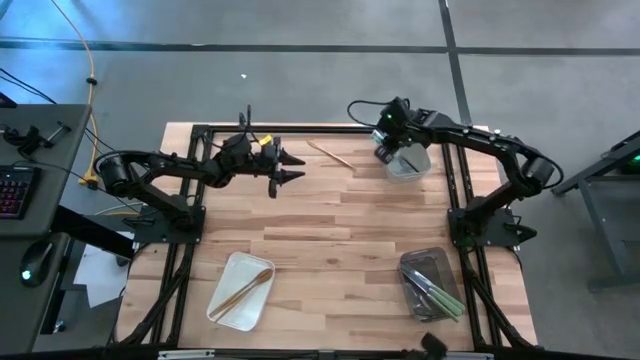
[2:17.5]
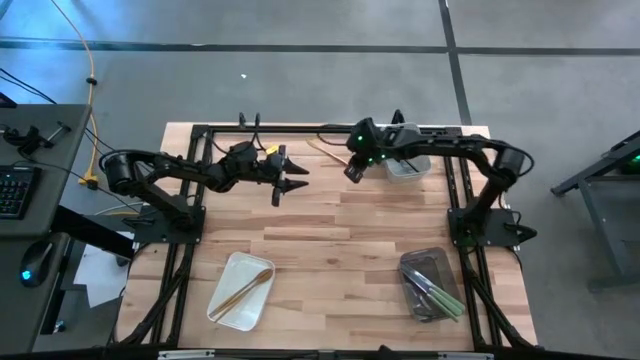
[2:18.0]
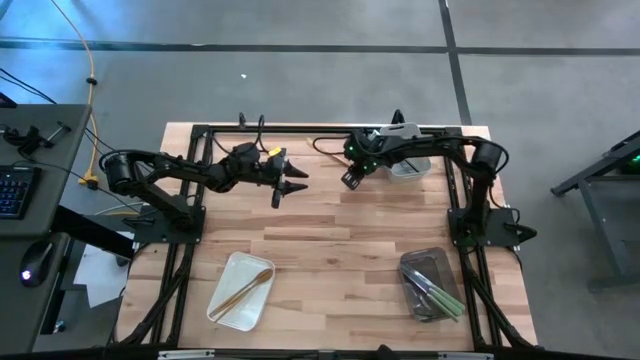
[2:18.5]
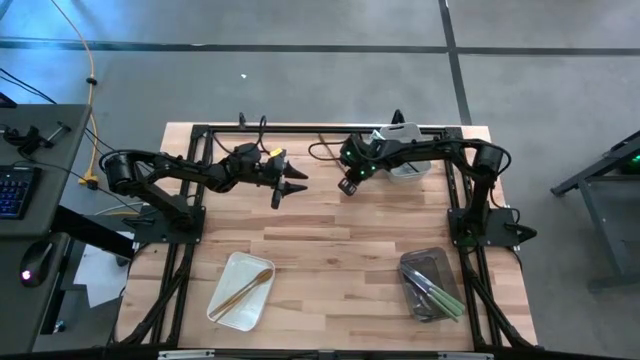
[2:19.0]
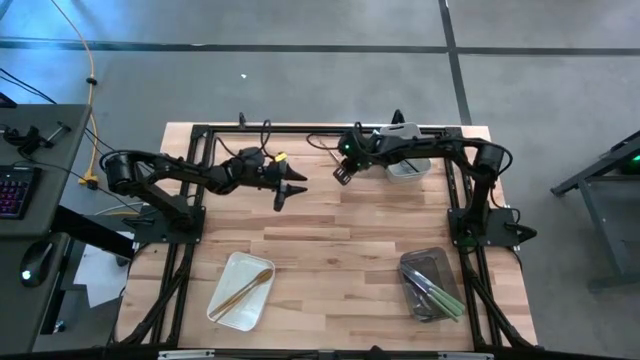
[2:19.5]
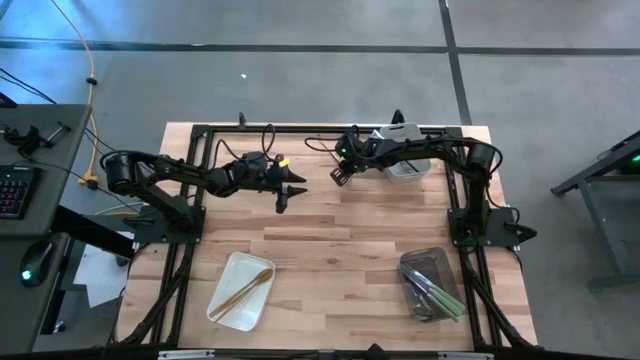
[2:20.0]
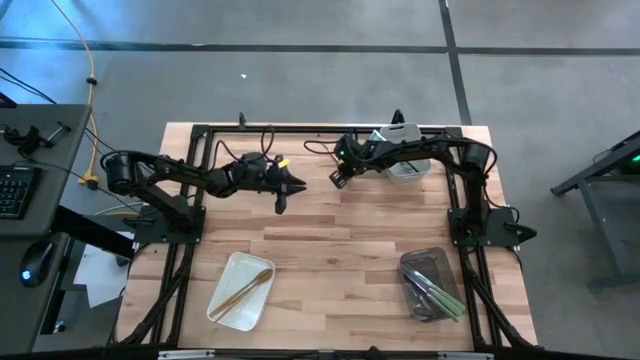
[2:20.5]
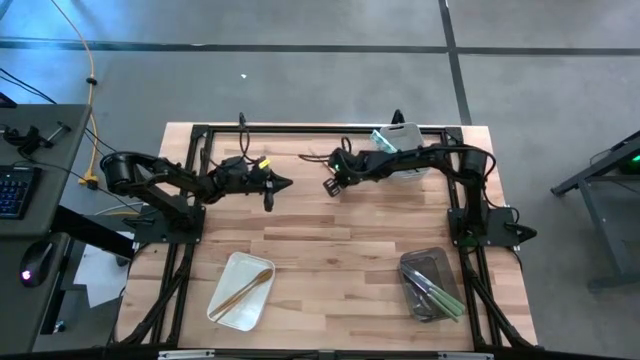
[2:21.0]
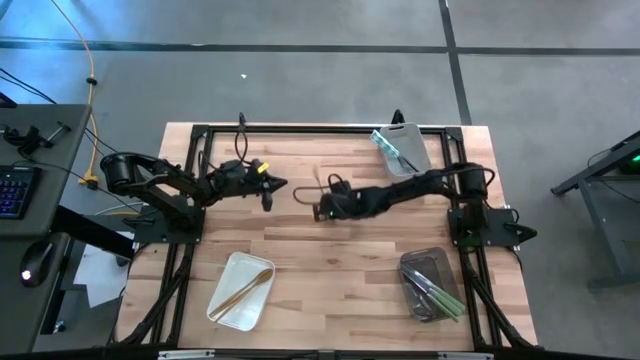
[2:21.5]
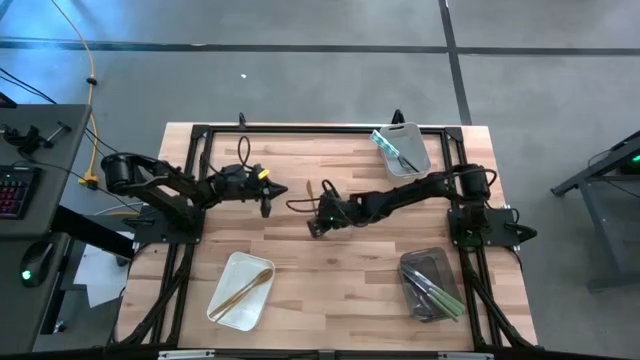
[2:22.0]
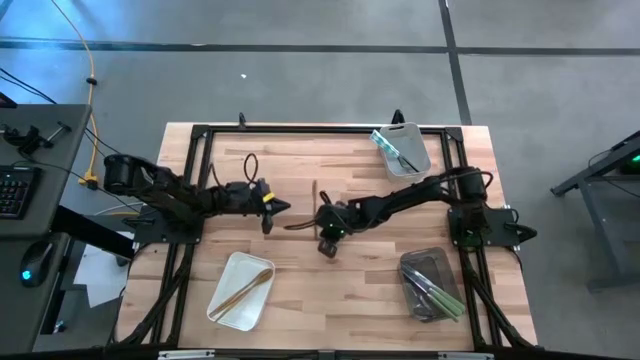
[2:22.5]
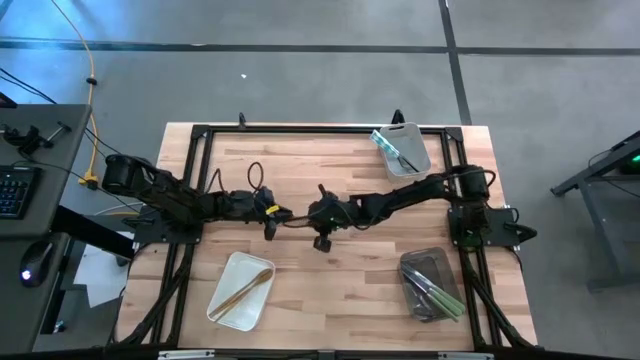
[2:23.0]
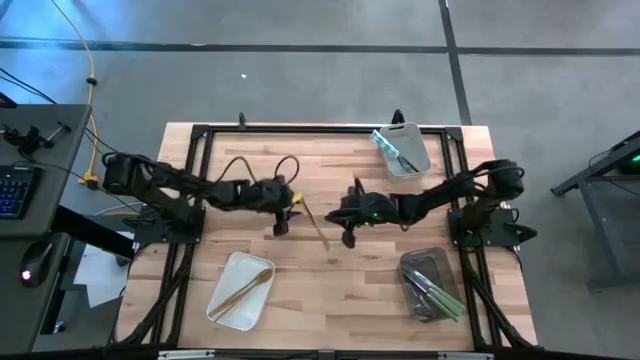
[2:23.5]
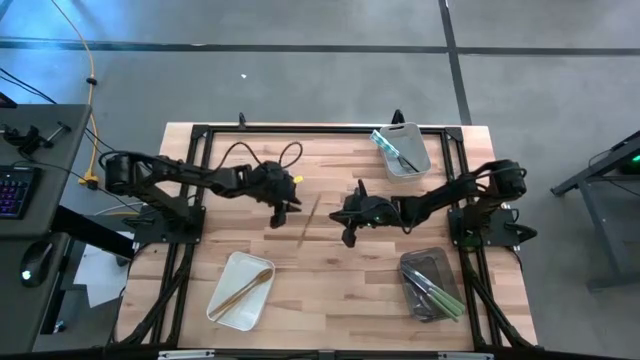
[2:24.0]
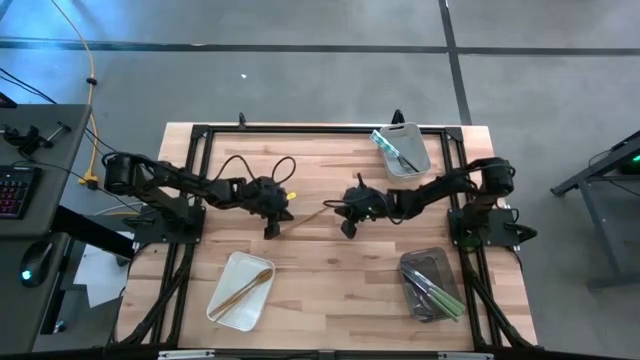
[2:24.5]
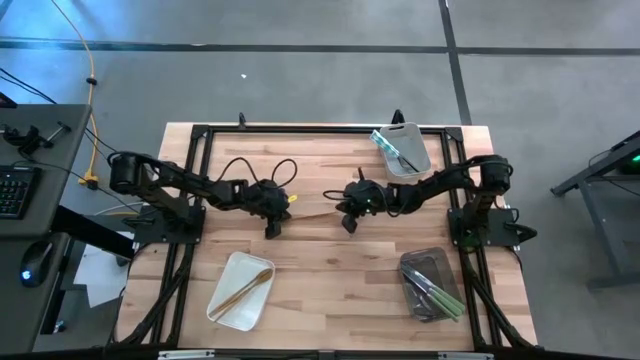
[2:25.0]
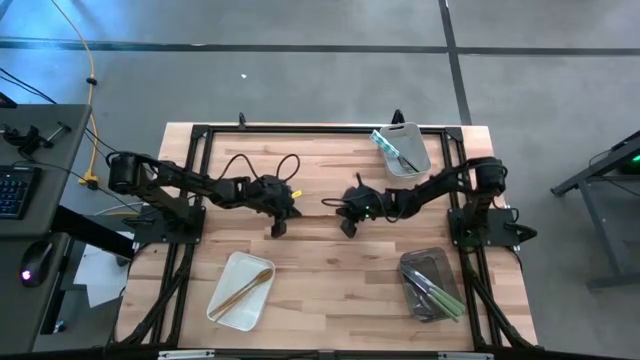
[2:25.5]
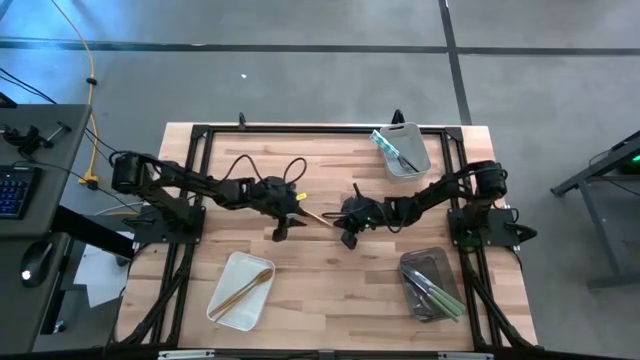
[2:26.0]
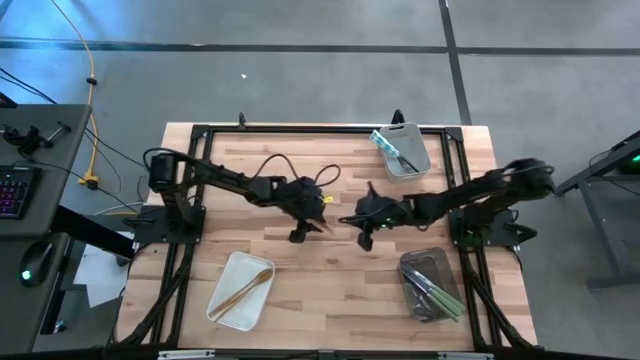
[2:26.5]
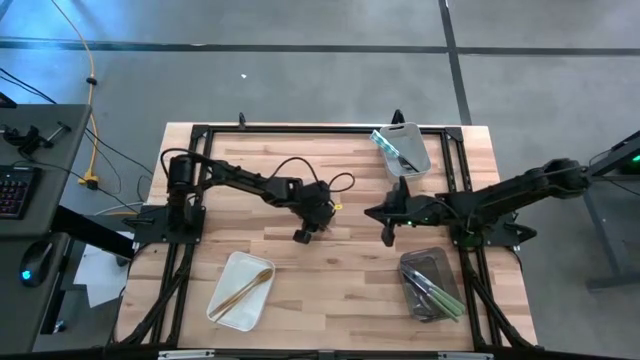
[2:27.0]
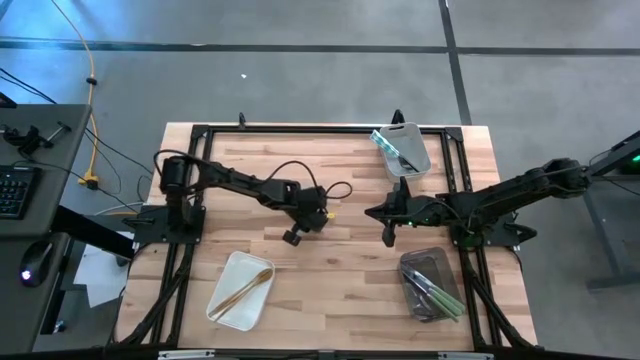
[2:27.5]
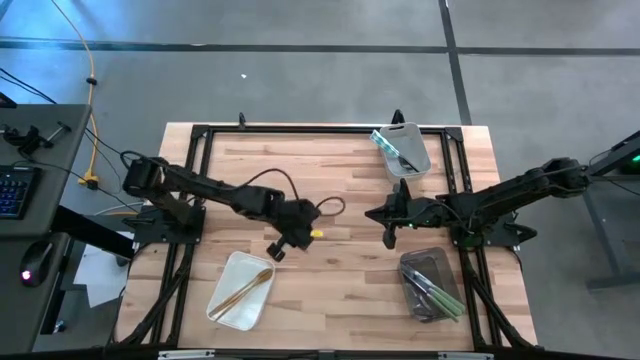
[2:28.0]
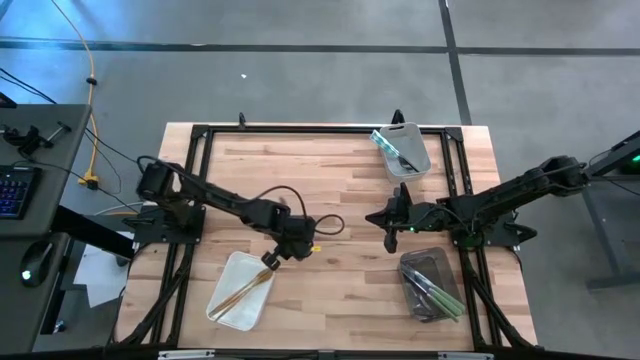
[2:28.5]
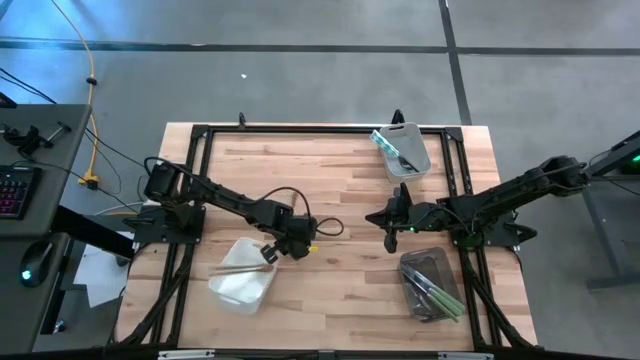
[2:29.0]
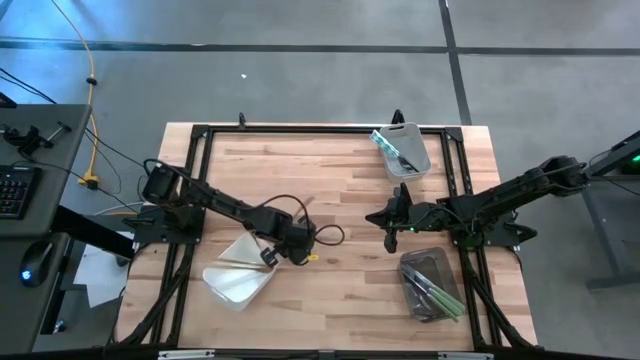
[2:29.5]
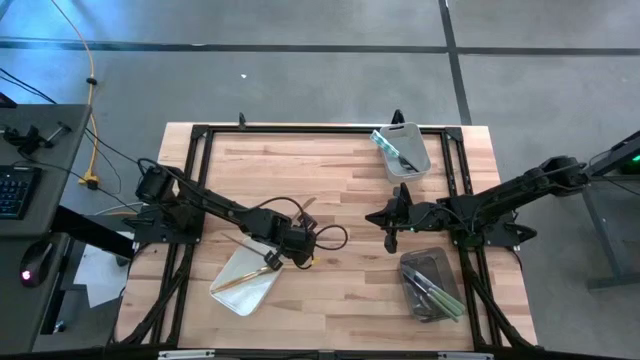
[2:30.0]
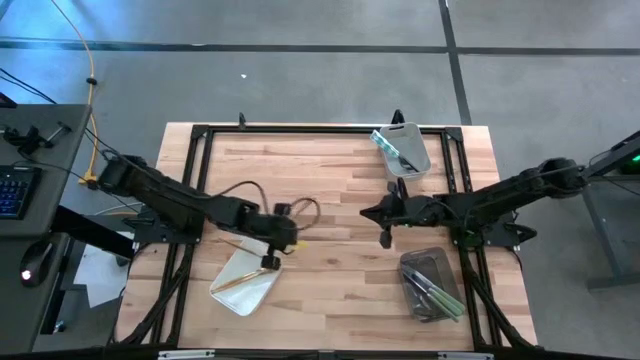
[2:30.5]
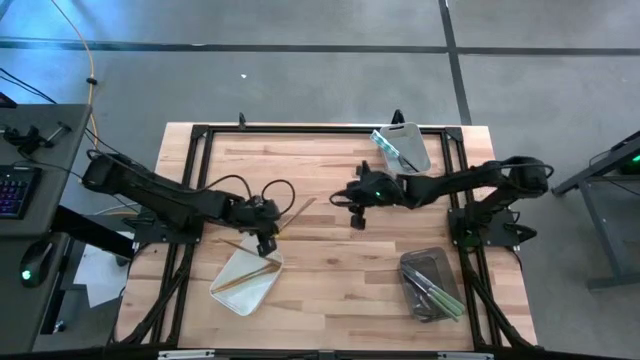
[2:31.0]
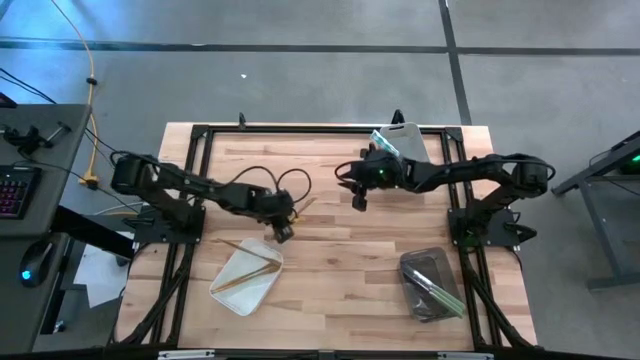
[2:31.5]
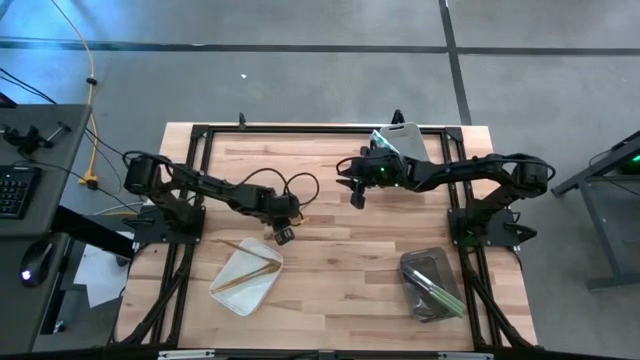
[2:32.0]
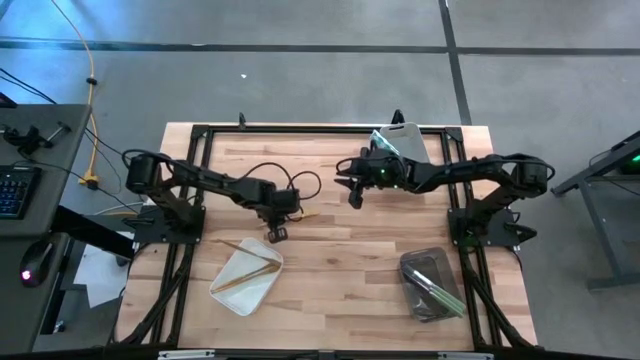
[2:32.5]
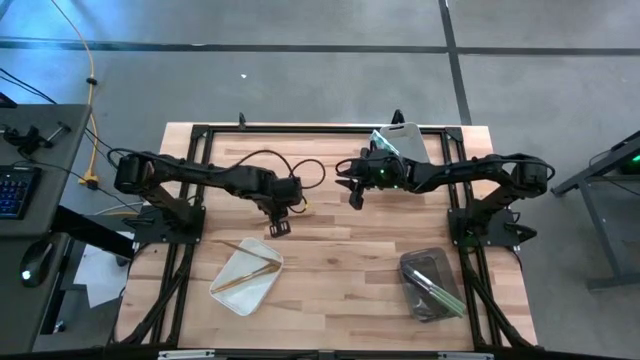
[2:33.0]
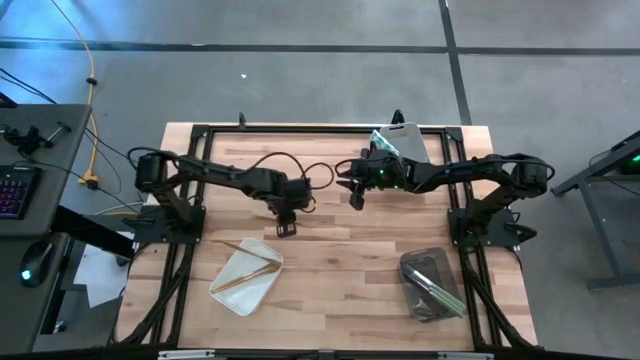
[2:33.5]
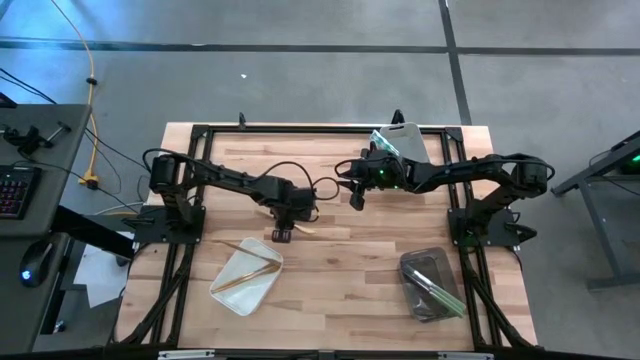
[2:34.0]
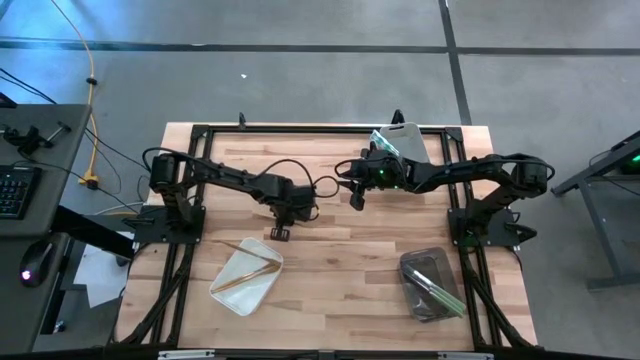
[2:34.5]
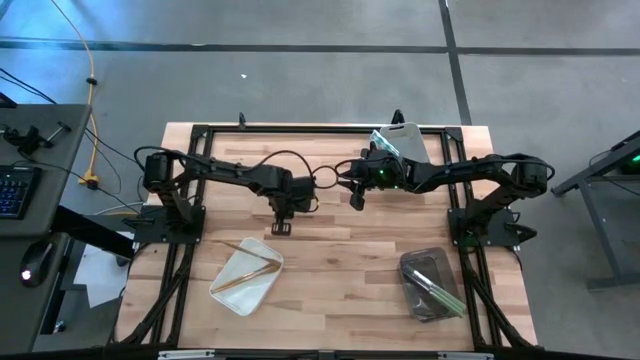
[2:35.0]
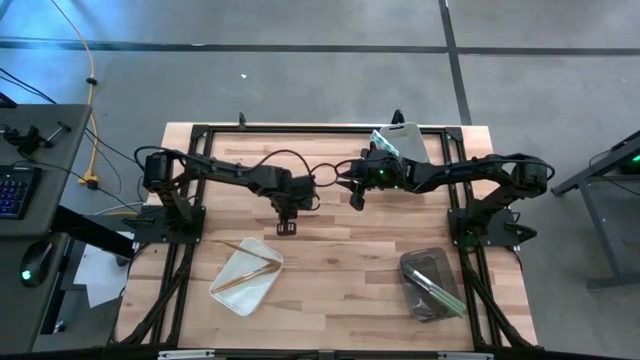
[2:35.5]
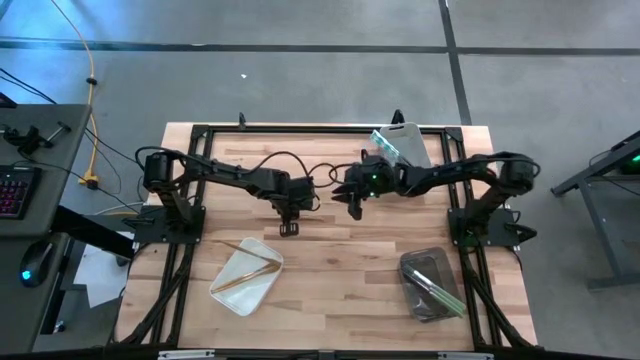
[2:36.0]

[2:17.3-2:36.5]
Task: Sort silverware by color (type)
Put the gold table knife into the white bin

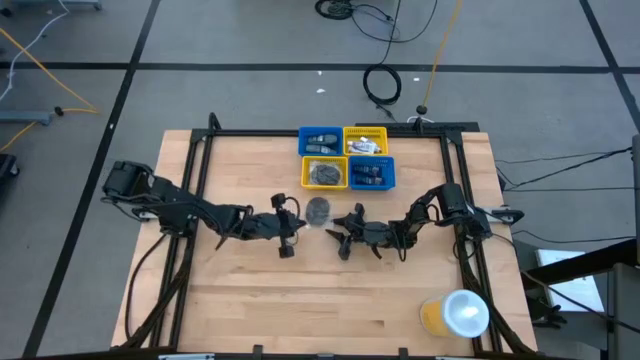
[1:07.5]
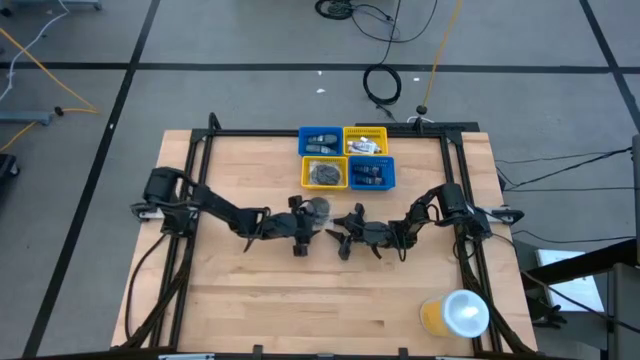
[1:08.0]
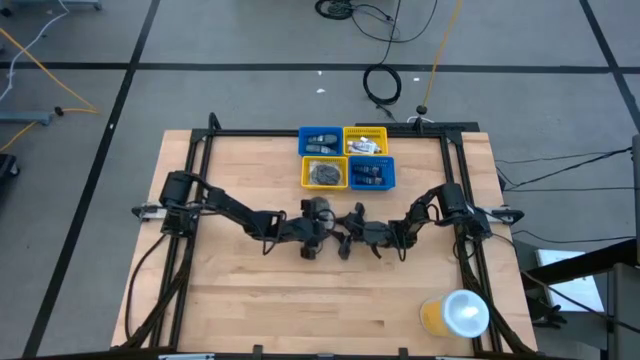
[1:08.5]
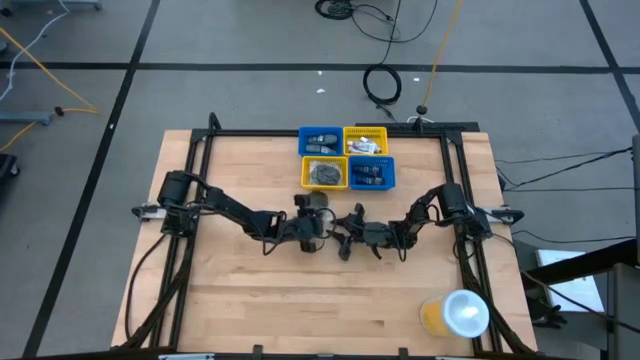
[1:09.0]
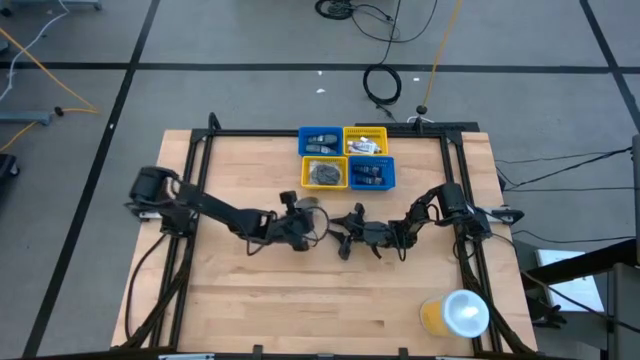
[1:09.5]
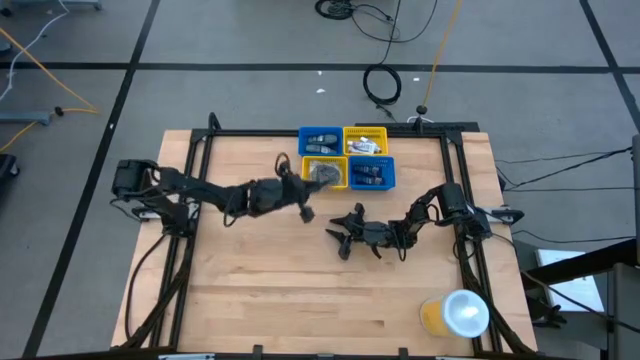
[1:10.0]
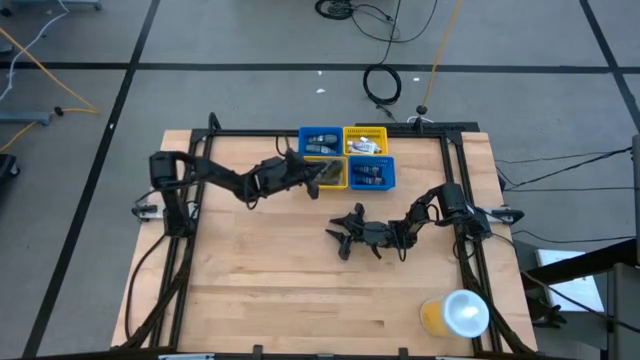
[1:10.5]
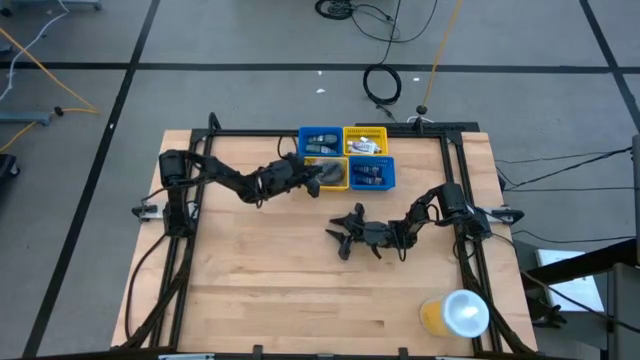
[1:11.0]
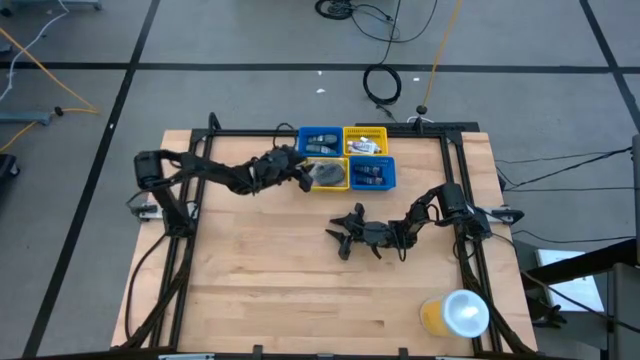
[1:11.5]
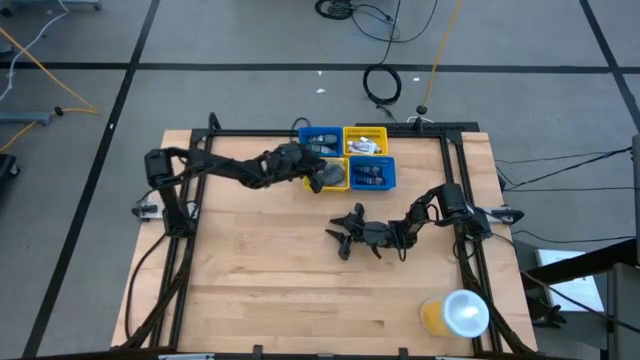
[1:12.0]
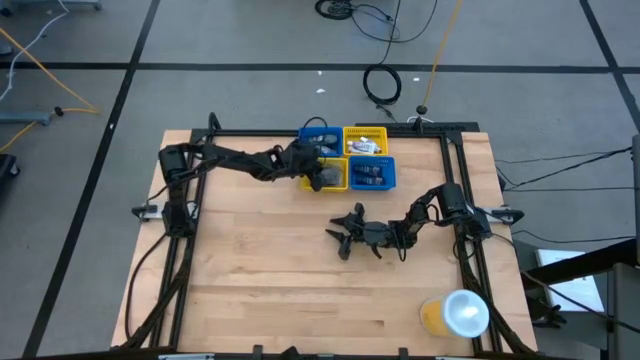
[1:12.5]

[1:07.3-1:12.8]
Task: Pick & Place Travel size toiletries
Put the black hairbrush into the left yellow bin
